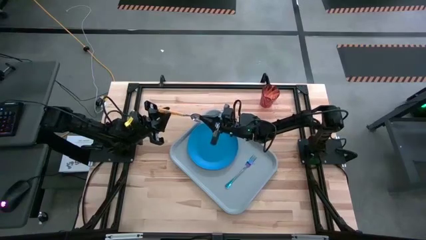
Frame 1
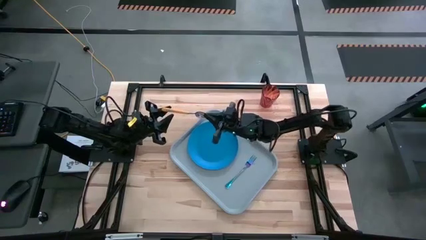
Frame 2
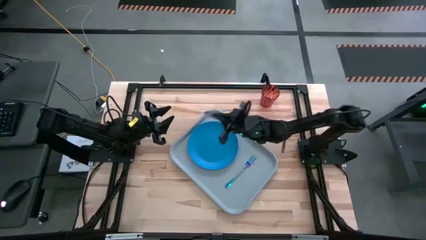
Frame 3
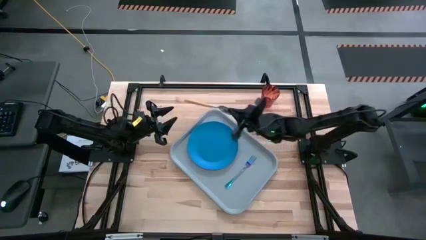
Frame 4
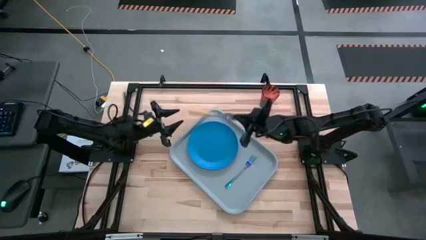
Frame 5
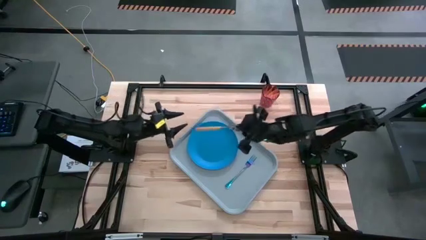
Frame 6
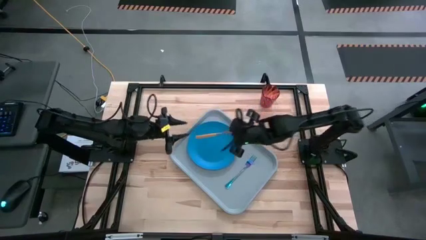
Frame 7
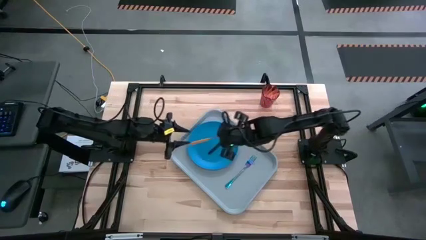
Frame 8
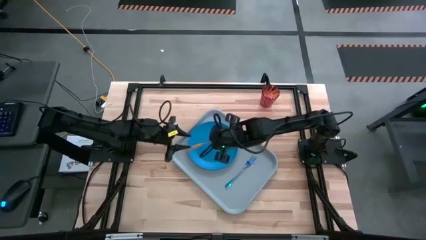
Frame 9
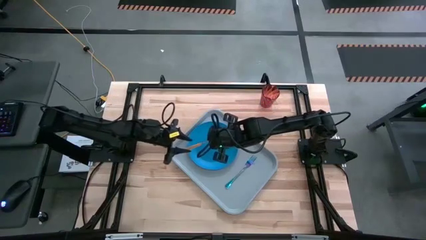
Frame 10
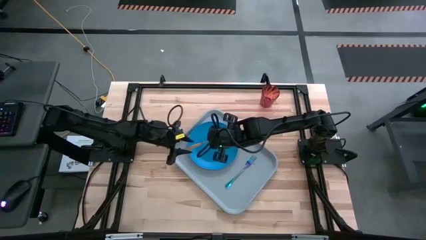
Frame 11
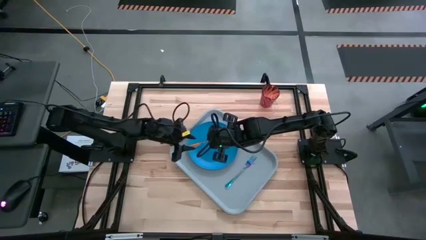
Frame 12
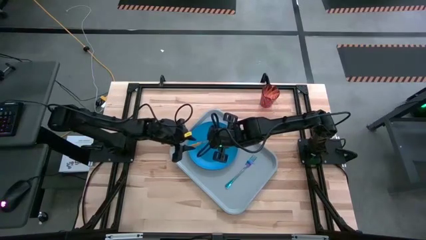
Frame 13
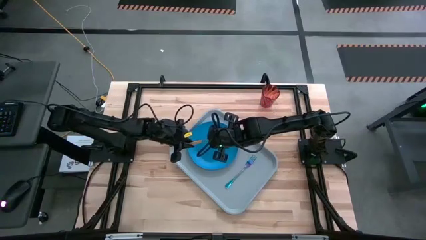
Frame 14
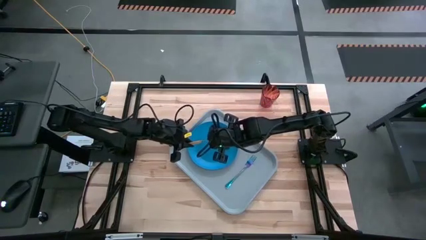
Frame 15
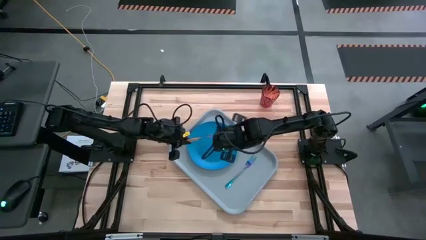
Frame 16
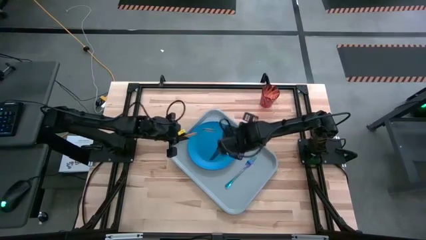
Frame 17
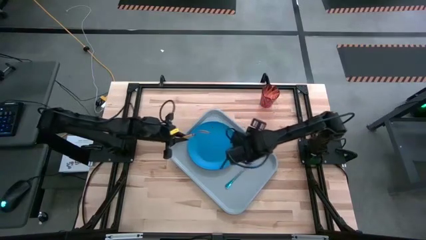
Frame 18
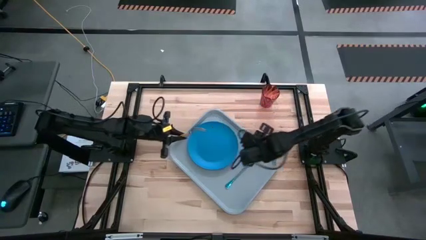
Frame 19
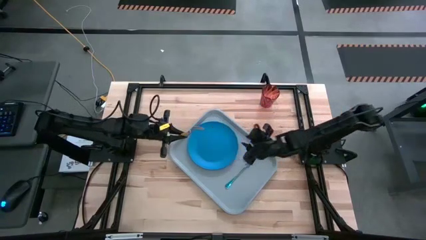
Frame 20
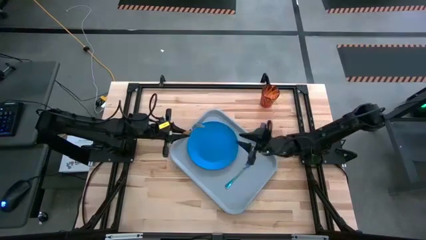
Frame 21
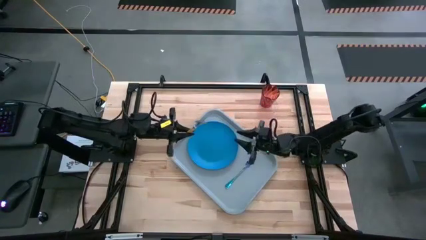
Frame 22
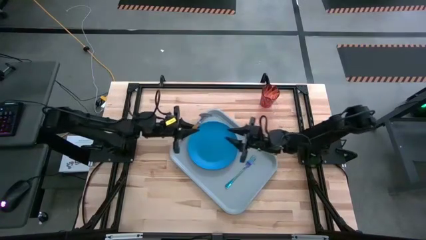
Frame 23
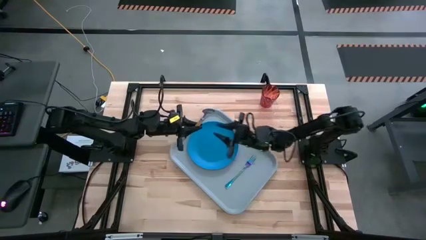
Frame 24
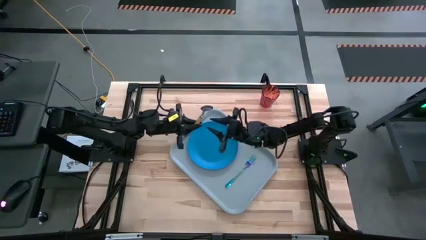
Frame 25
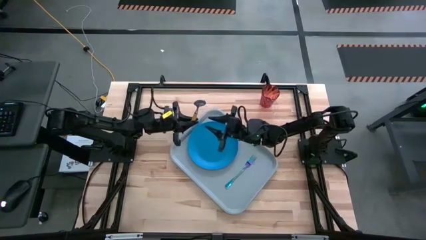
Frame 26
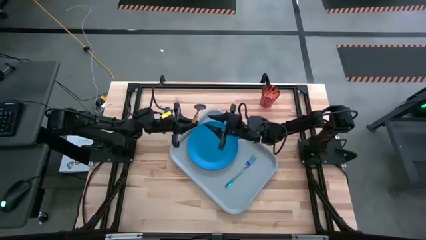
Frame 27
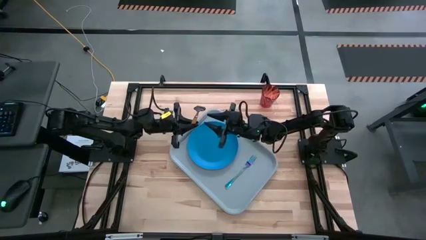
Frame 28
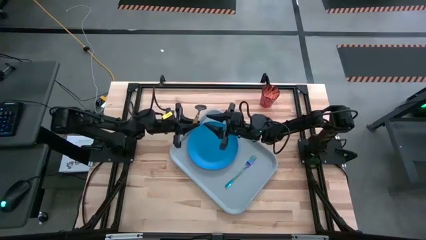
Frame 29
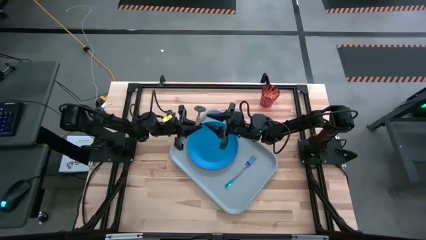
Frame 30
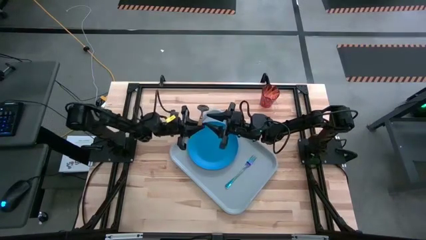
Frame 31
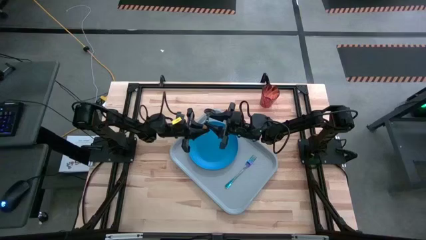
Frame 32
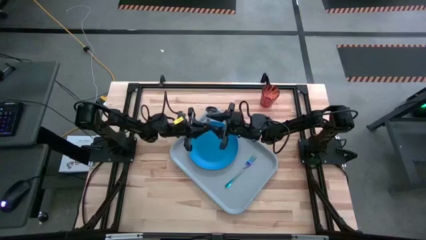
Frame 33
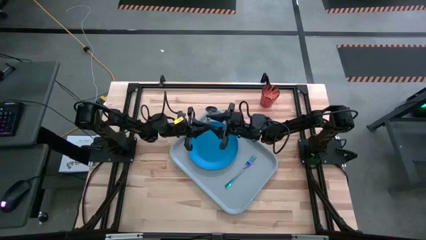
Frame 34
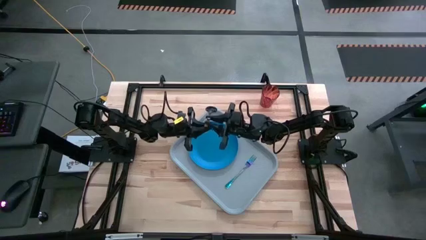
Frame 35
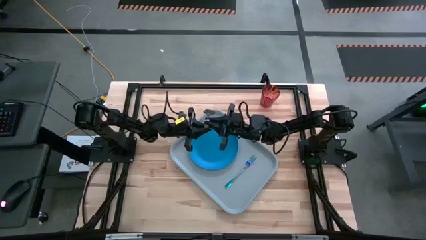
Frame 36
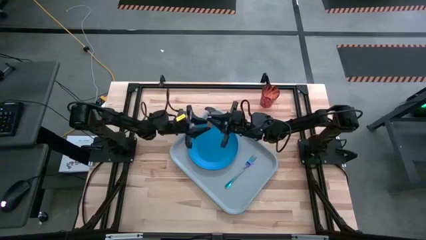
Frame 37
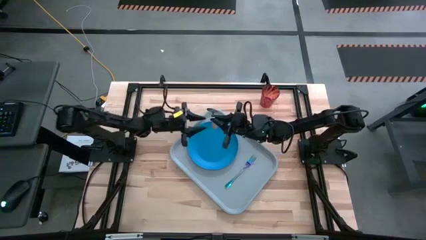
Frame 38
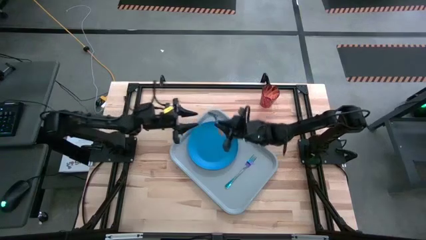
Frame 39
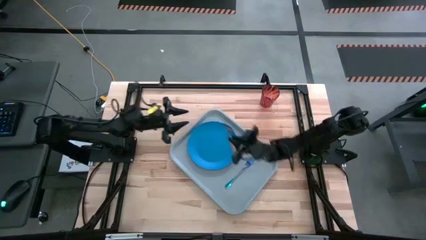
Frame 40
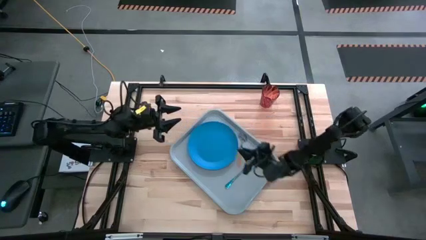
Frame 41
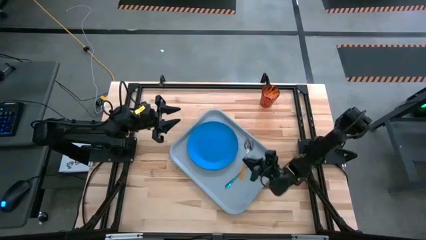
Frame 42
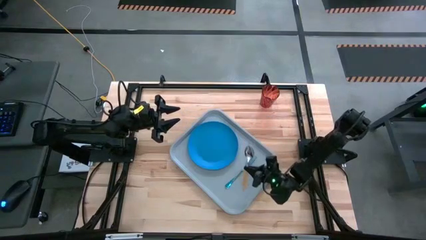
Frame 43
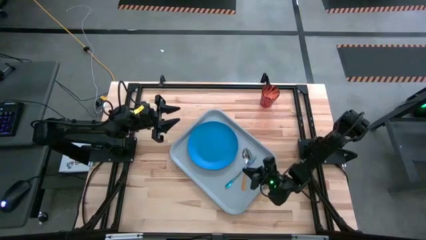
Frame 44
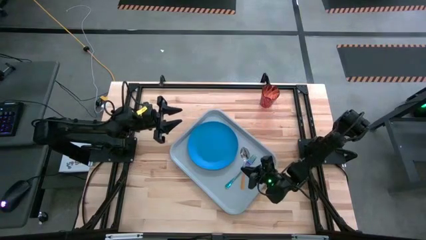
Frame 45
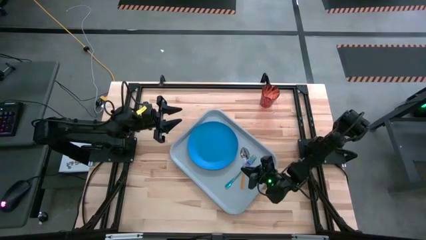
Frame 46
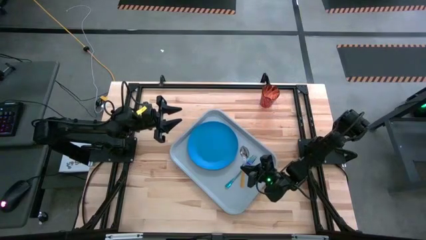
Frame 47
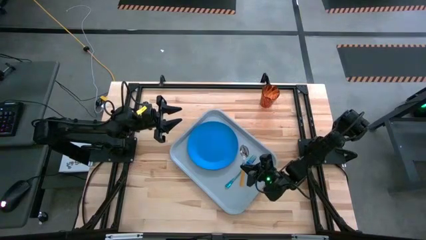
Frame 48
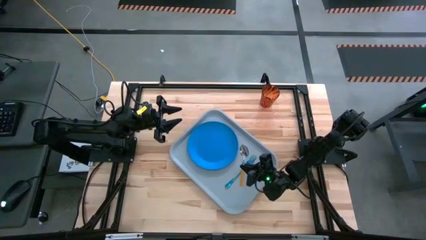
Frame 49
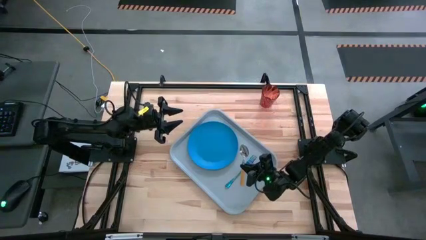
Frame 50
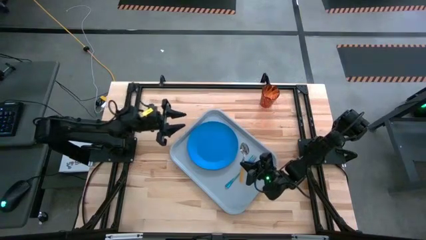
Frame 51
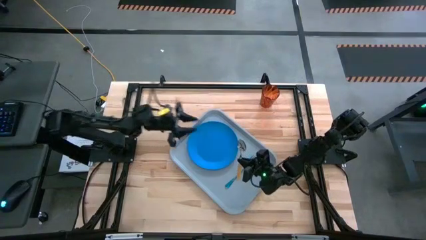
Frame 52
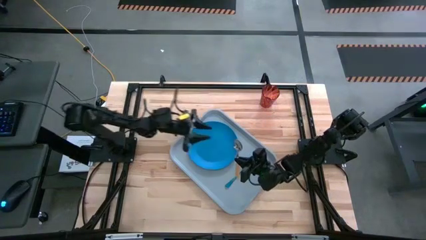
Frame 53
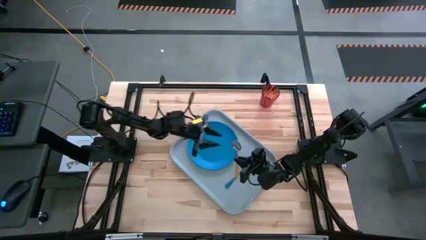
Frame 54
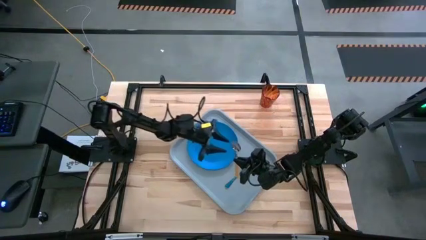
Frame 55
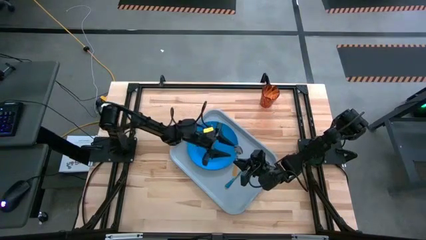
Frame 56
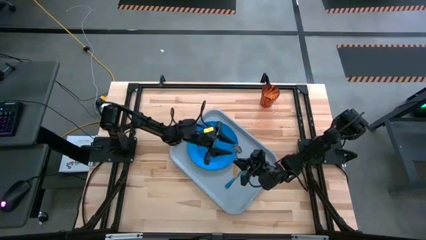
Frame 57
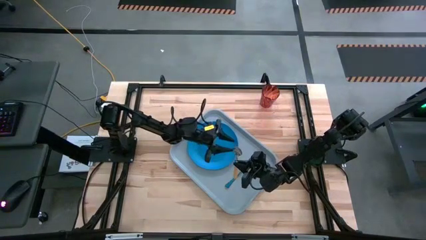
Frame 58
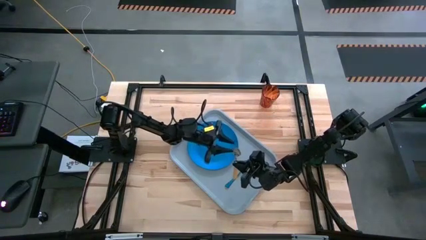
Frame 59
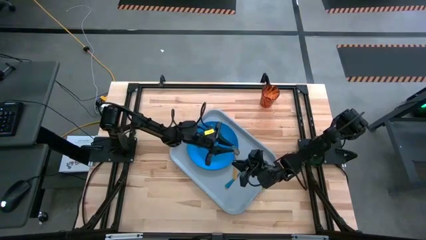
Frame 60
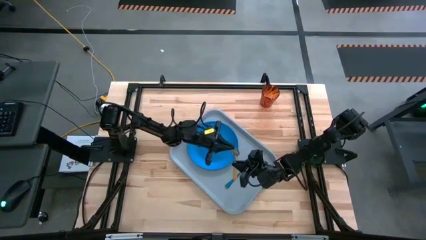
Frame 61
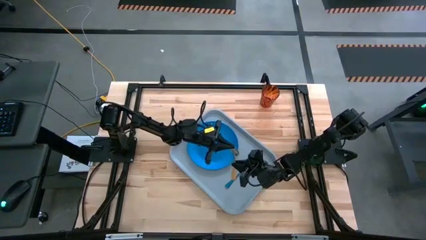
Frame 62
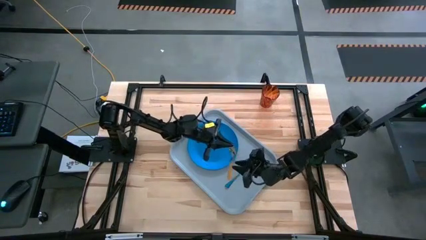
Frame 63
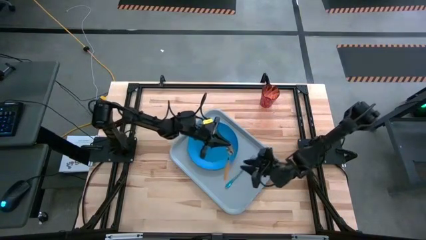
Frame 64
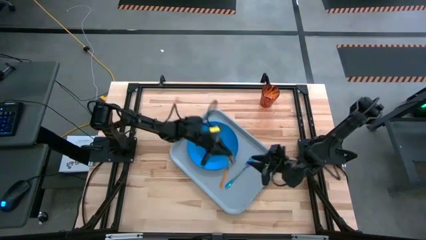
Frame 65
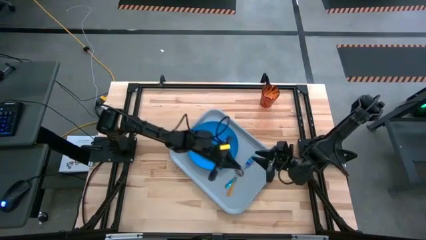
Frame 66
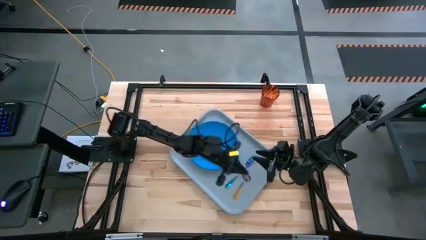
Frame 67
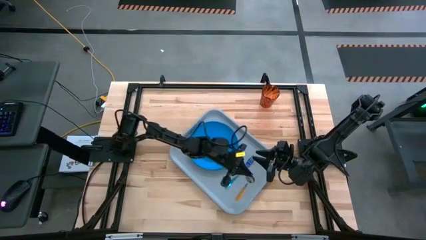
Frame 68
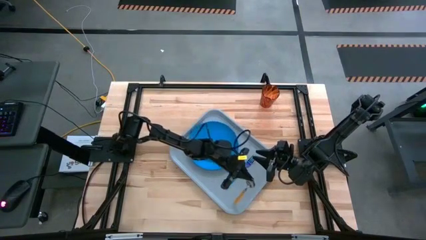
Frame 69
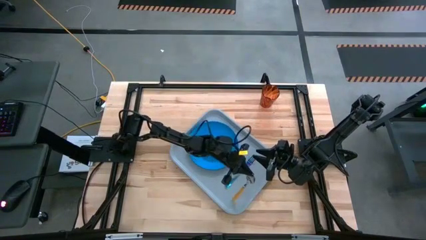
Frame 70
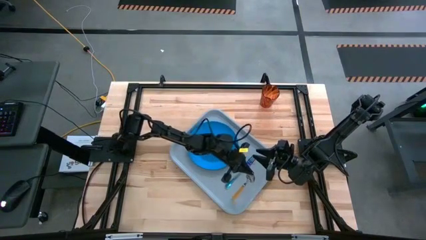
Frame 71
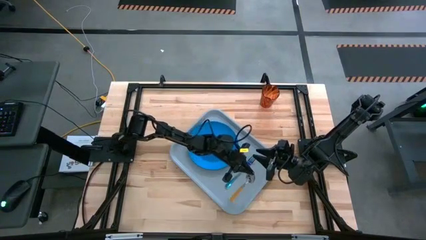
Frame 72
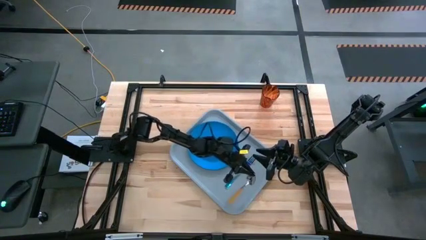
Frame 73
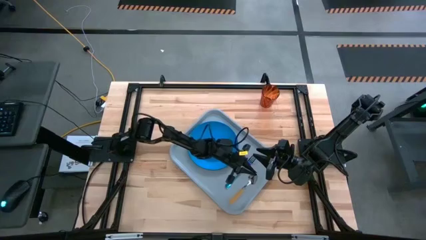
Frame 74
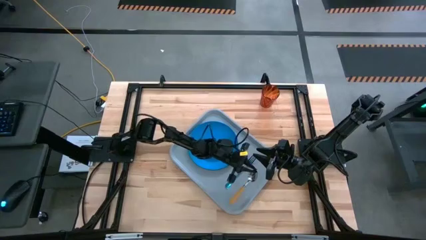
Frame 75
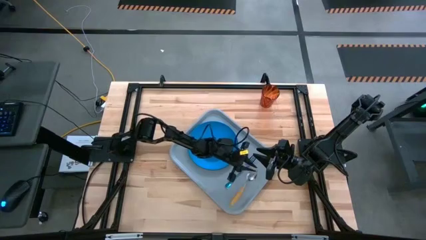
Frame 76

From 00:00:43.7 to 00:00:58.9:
Task: Pick and place plate/cup/fork/spoon on tray
Put the yellow spoon on the right side of the gray serving tray

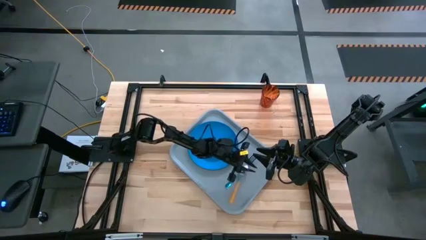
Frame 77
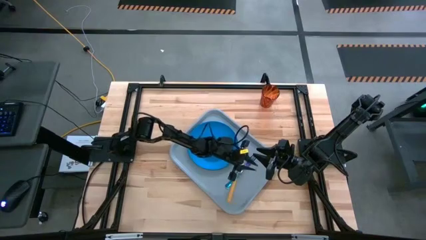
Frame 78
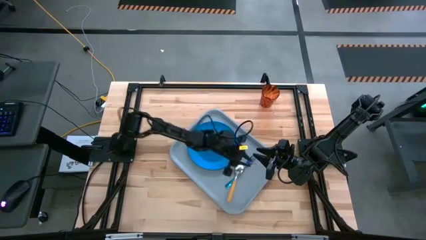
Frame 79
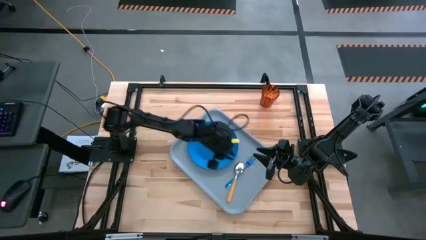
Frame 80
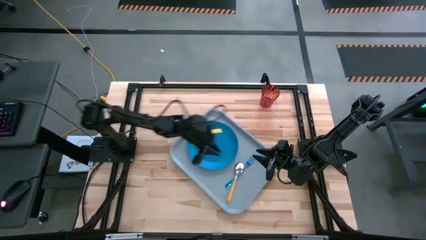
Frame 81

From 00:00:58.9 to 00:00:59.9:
Put the yellow spoon on the right side of the gray serving tray
